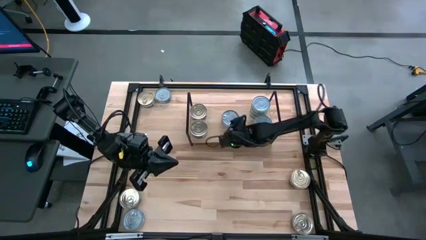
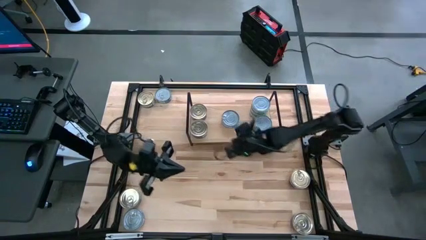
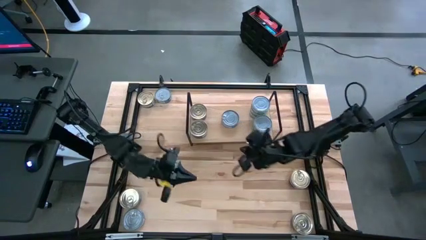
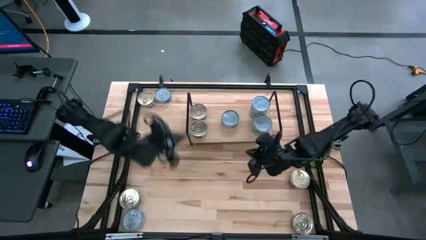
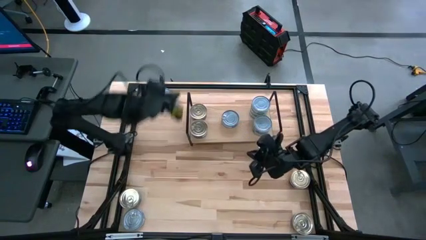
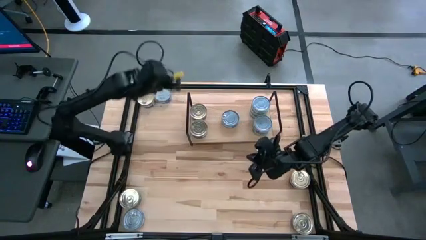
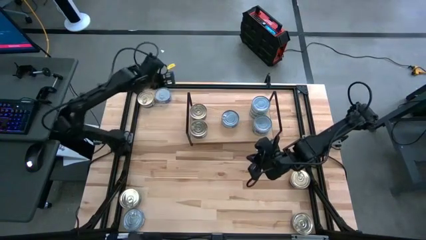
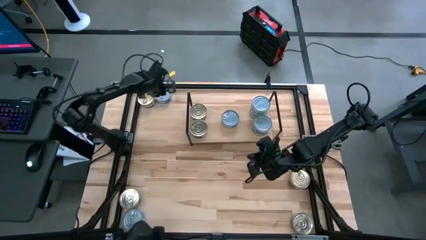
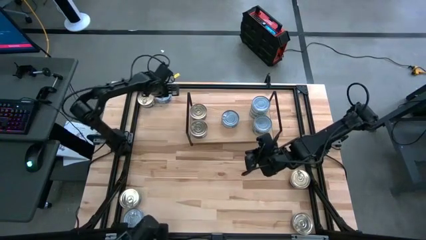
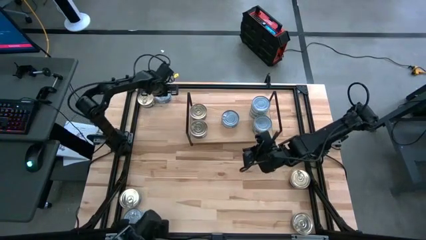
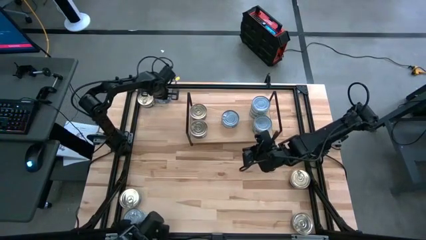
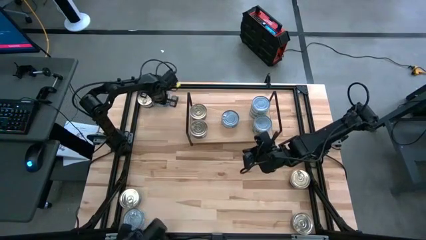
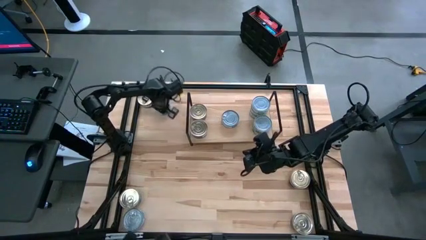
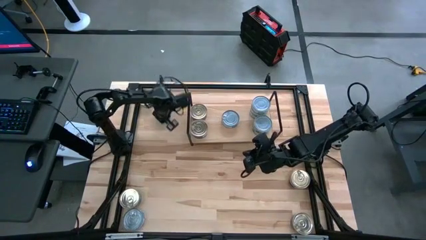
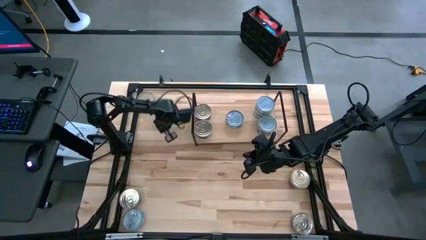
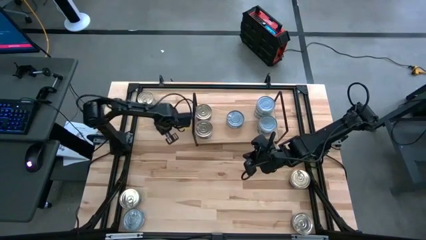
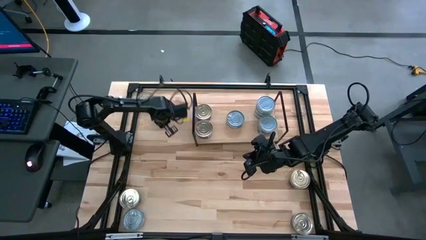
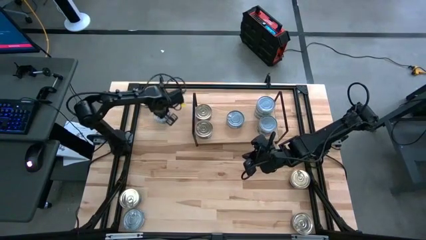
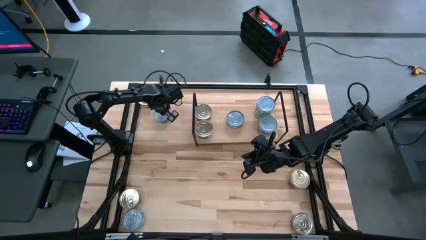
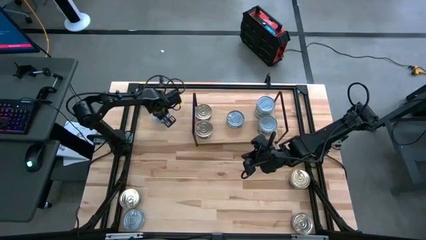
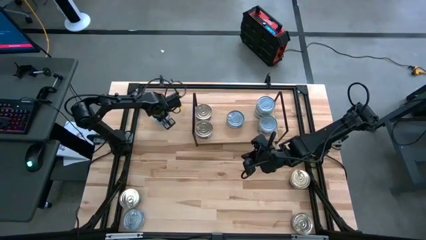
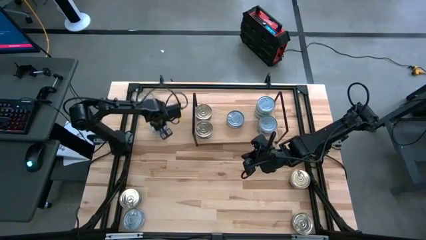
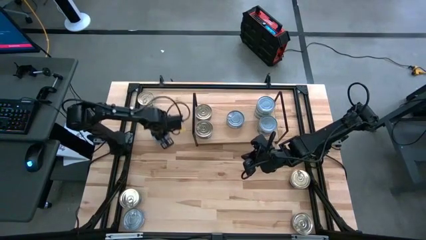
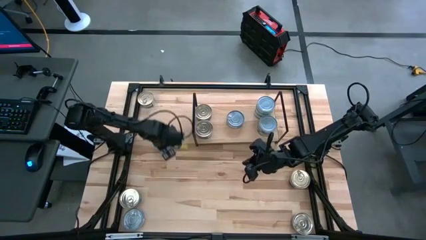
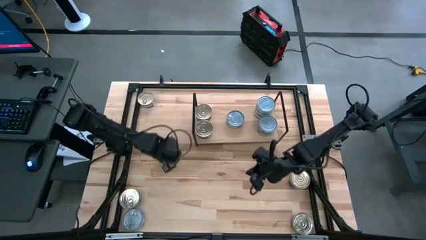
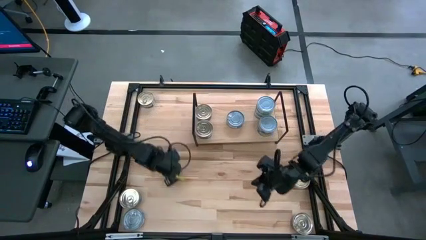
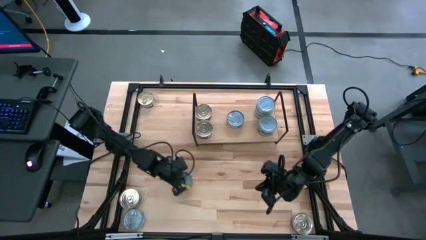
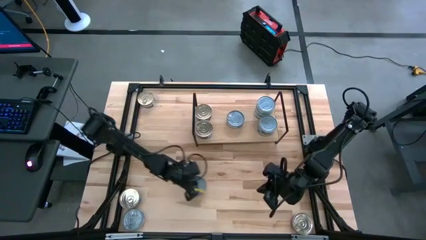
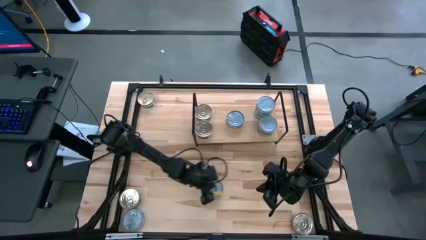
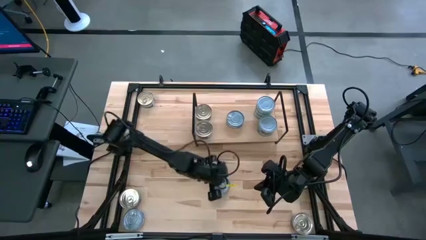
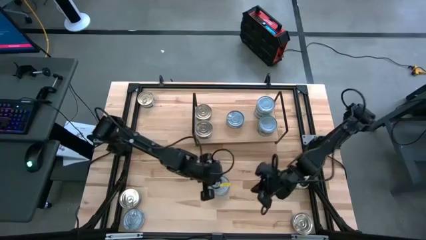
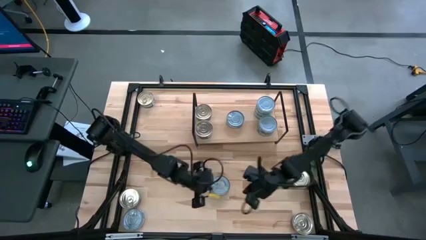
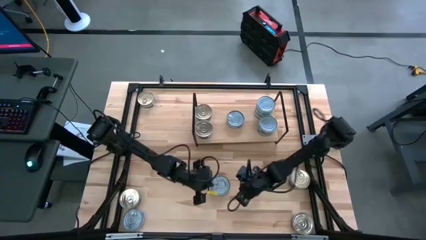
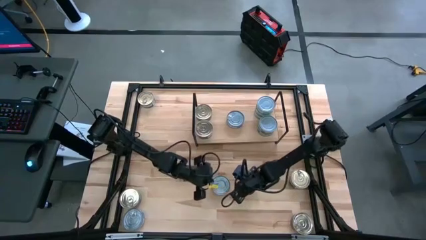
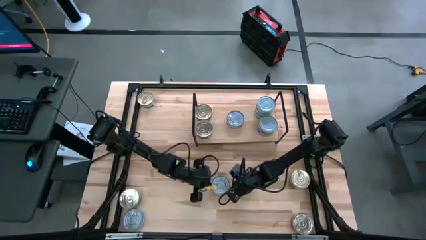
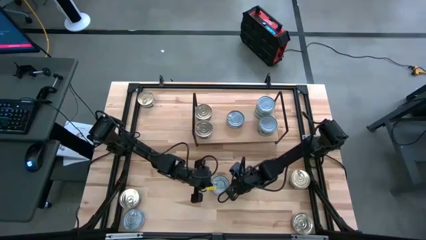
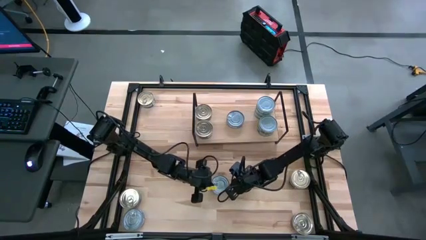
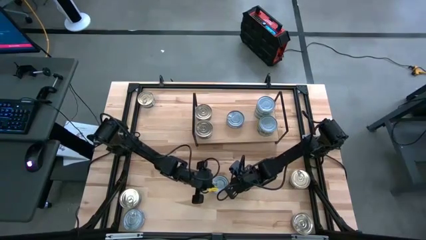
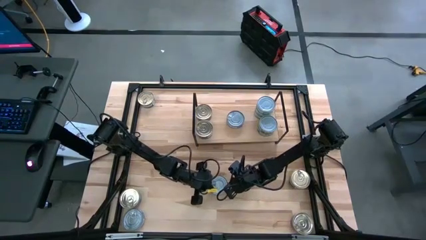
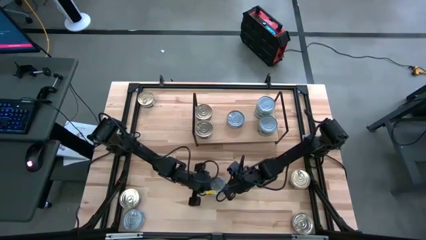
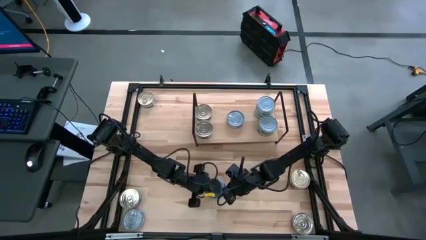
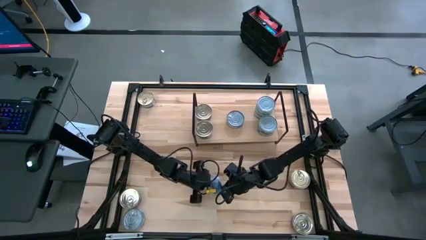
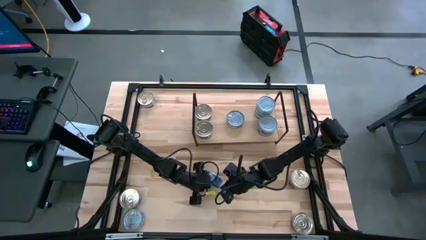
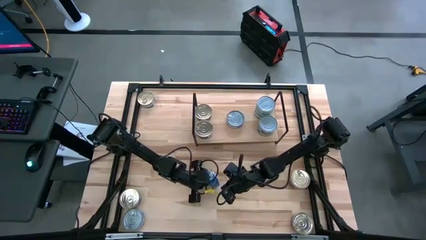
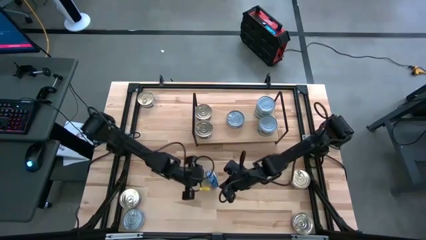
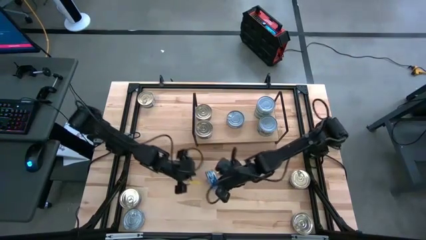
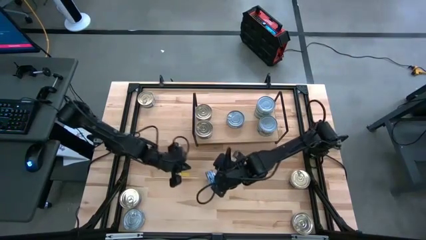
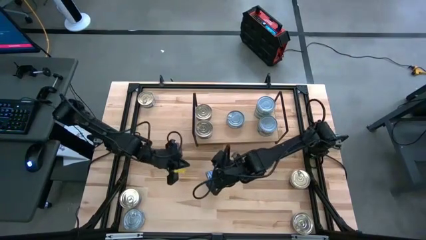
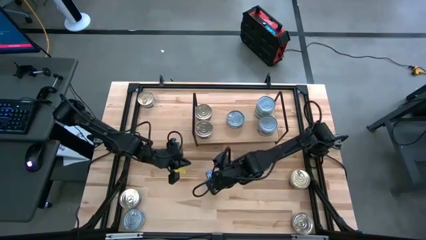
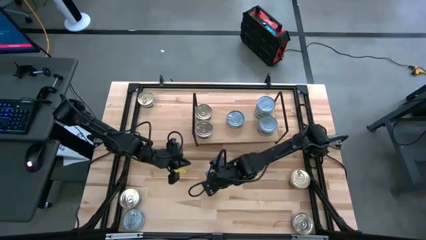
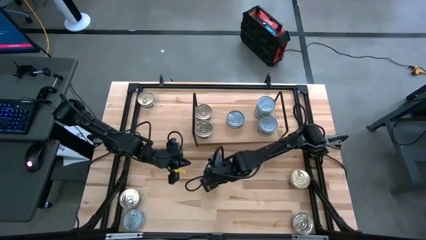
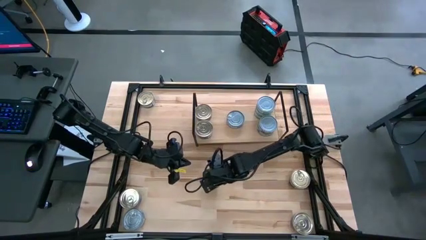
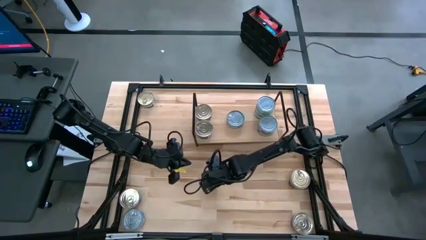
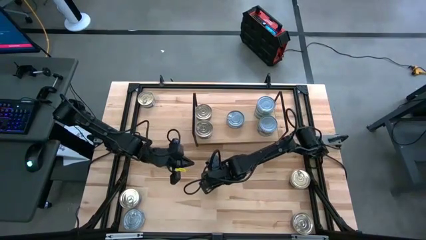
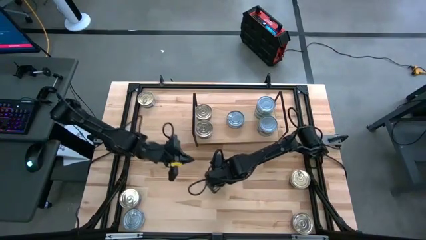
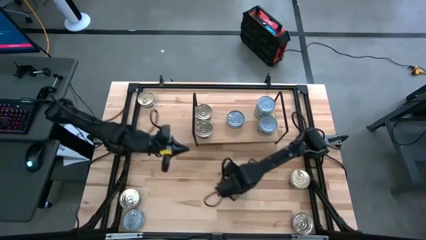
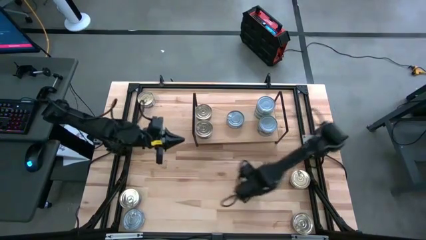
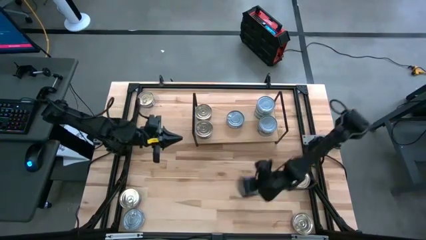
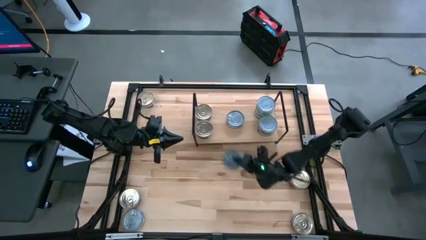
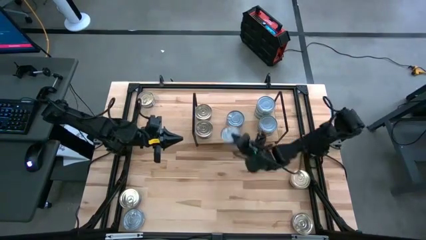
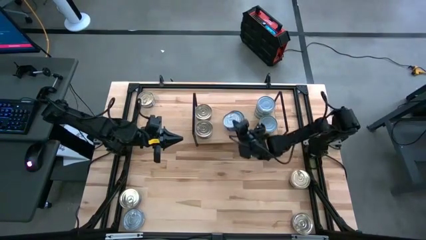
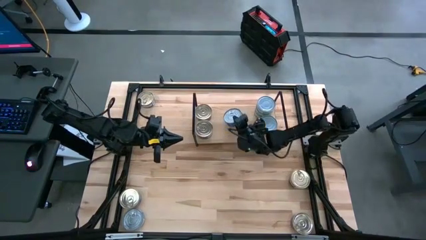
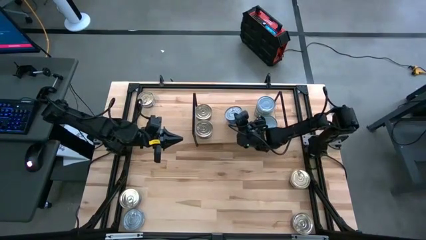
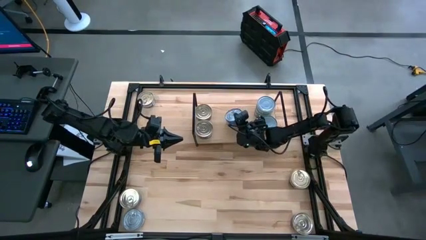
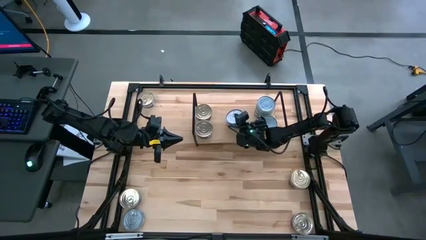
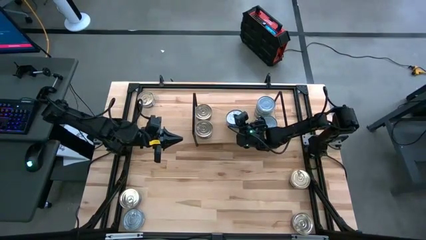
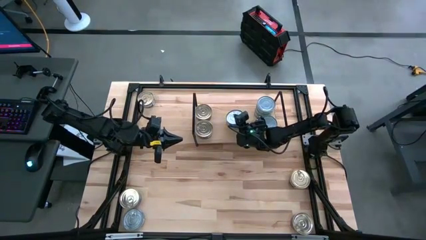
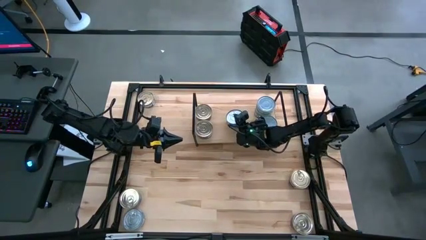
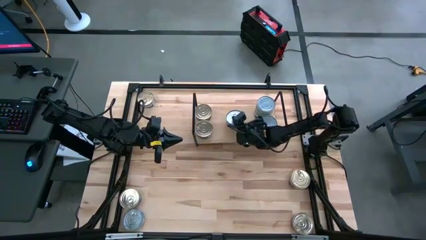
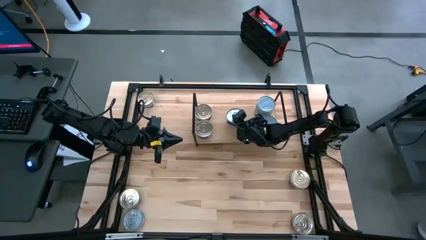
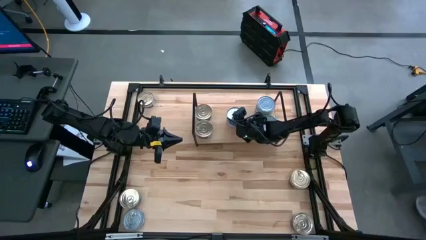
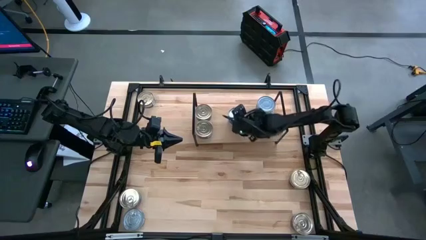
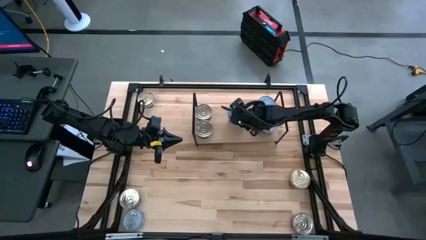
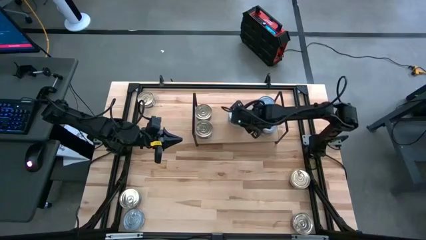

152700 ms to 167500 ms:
Task: Stack canned seafood by type on shelf
Stack the blue tuna can on top of the other blue tuna can on the shelf
